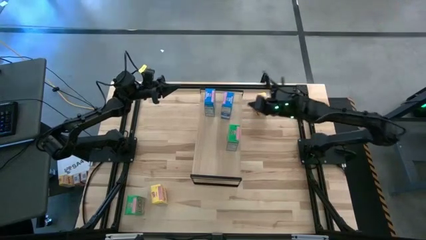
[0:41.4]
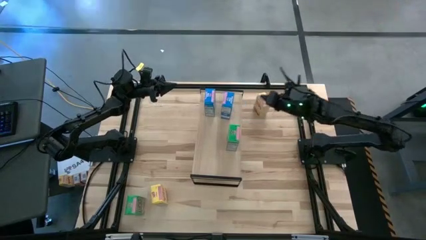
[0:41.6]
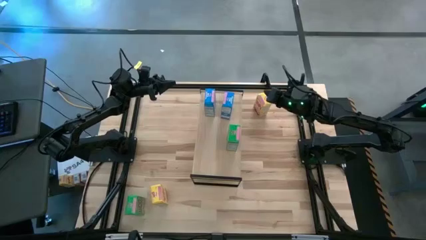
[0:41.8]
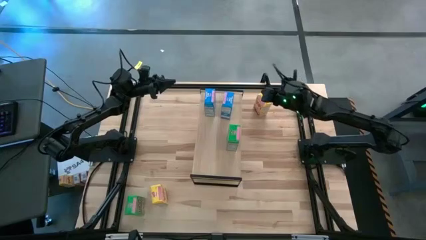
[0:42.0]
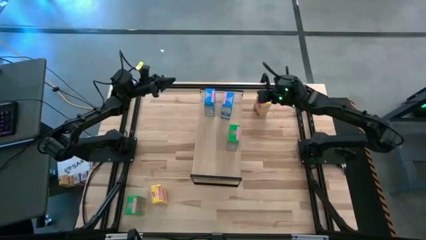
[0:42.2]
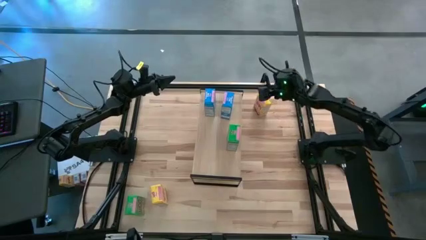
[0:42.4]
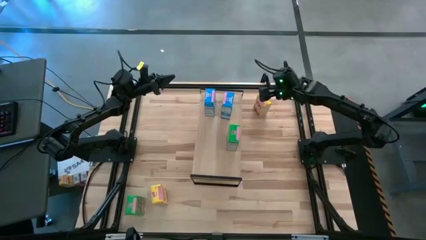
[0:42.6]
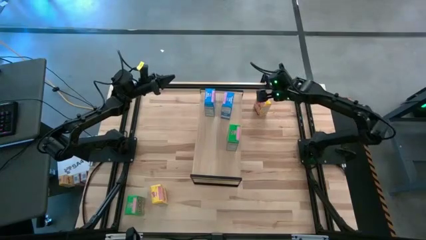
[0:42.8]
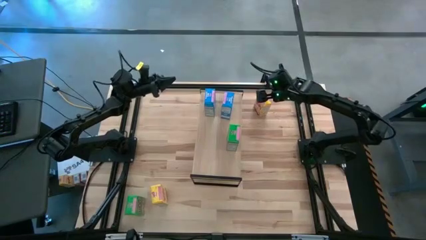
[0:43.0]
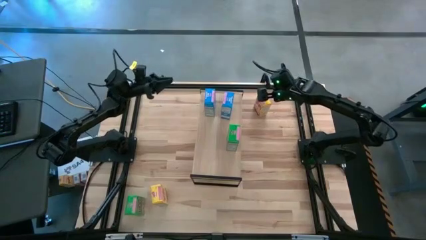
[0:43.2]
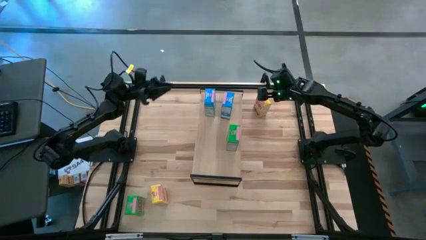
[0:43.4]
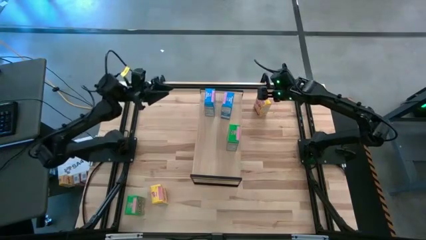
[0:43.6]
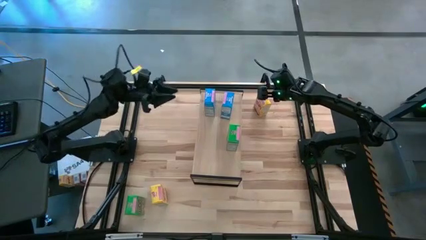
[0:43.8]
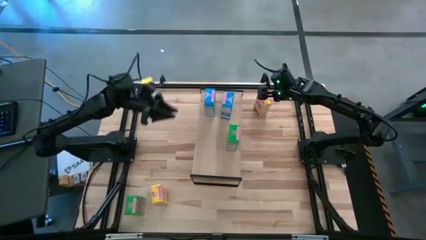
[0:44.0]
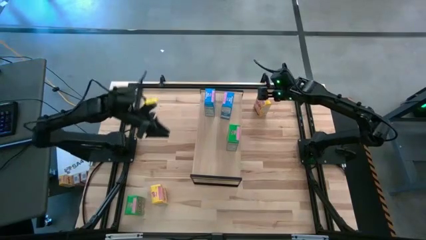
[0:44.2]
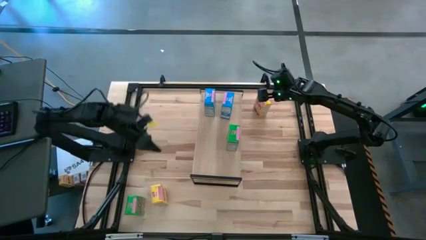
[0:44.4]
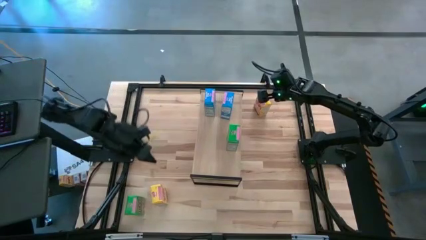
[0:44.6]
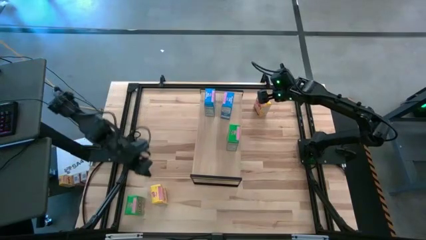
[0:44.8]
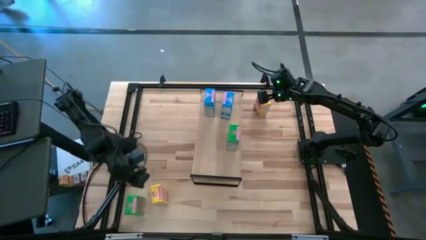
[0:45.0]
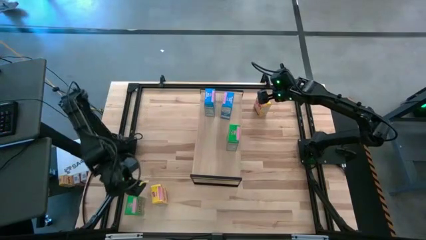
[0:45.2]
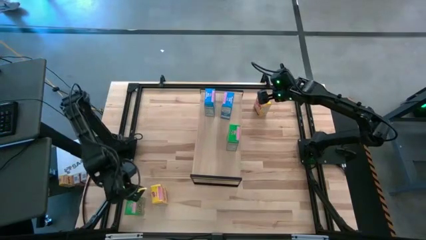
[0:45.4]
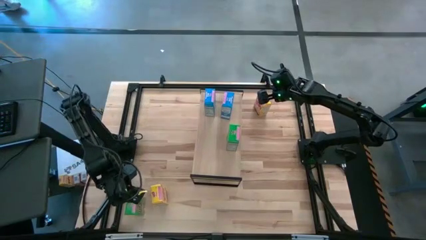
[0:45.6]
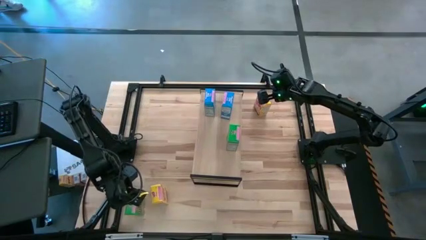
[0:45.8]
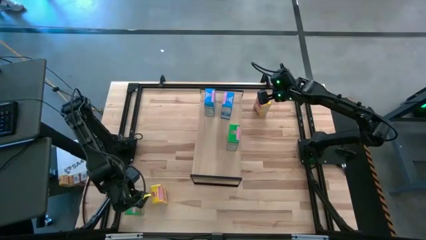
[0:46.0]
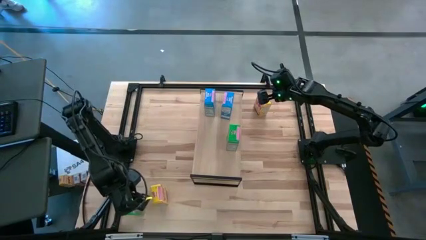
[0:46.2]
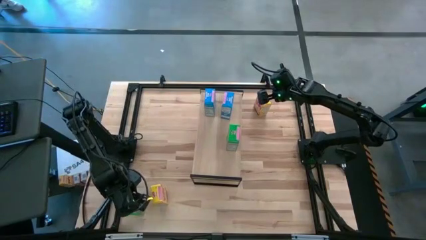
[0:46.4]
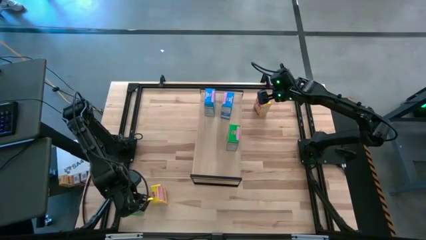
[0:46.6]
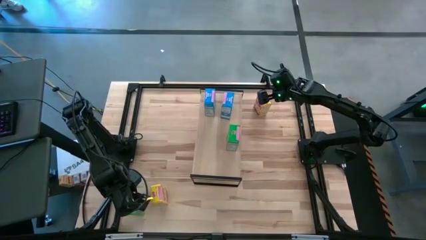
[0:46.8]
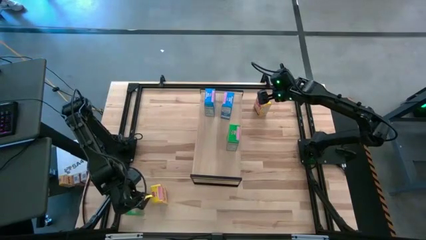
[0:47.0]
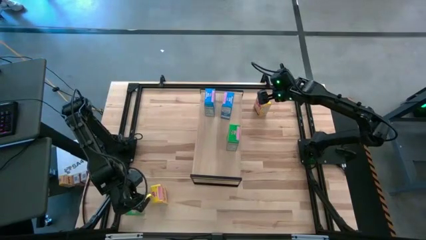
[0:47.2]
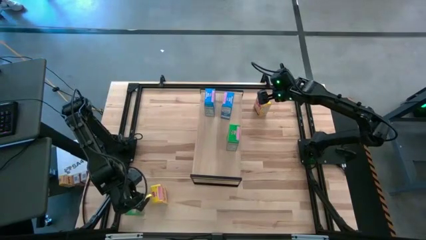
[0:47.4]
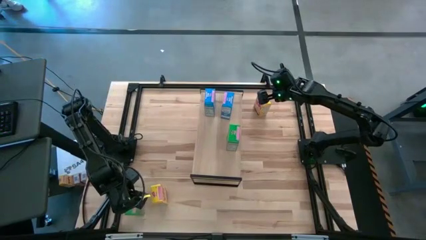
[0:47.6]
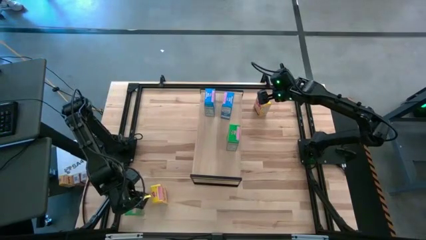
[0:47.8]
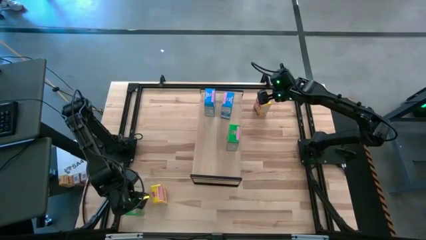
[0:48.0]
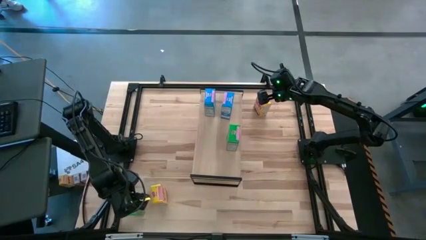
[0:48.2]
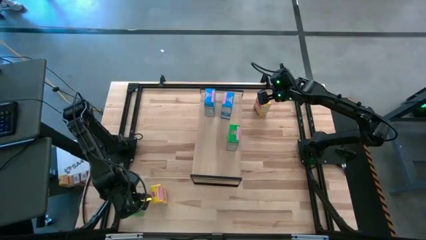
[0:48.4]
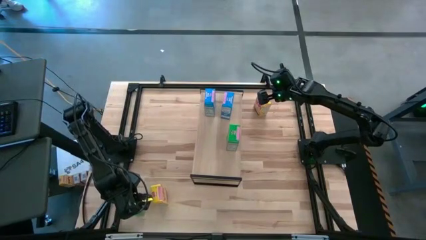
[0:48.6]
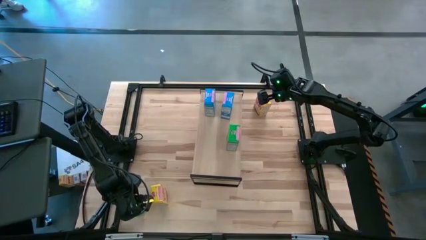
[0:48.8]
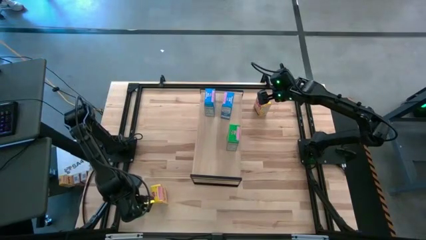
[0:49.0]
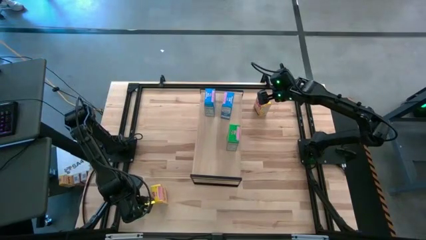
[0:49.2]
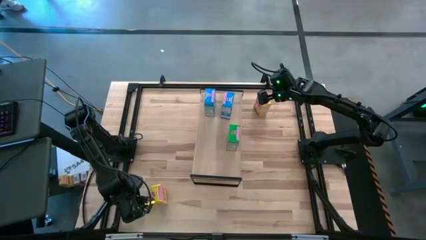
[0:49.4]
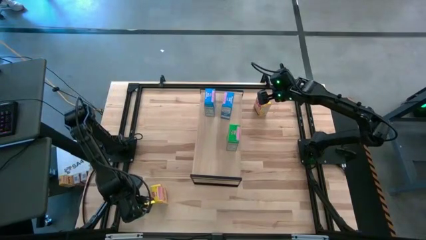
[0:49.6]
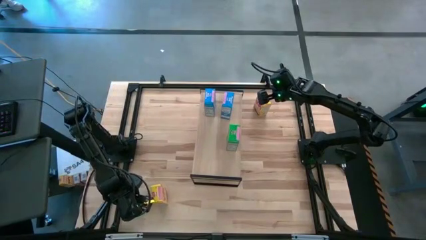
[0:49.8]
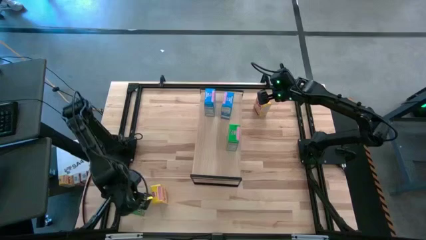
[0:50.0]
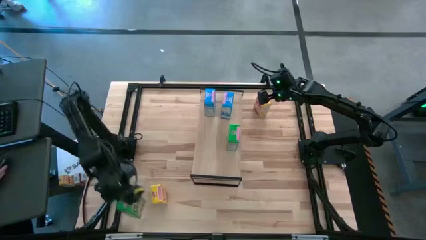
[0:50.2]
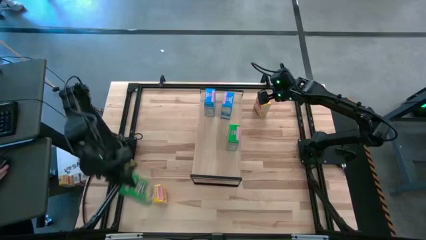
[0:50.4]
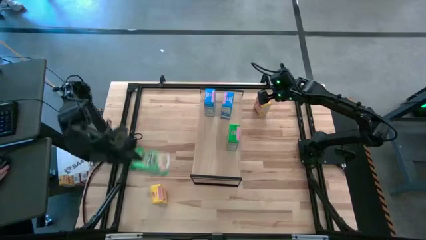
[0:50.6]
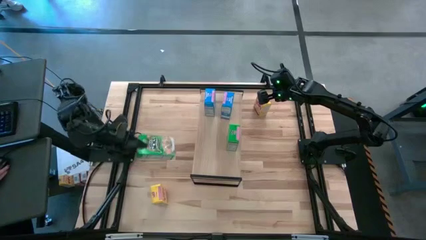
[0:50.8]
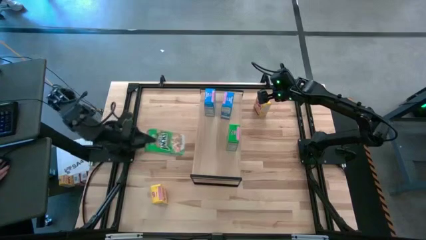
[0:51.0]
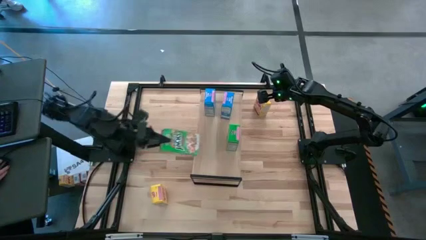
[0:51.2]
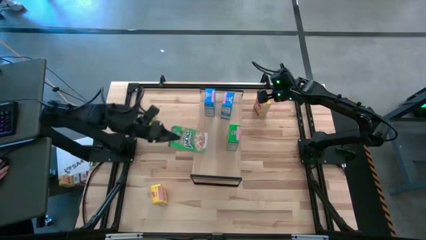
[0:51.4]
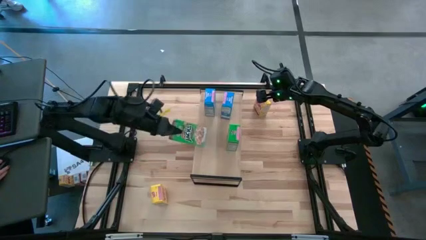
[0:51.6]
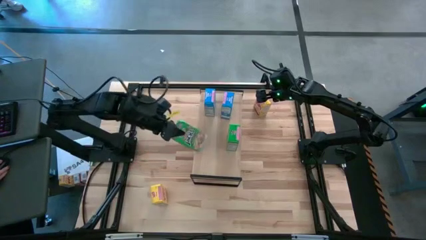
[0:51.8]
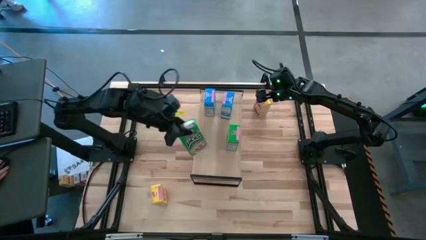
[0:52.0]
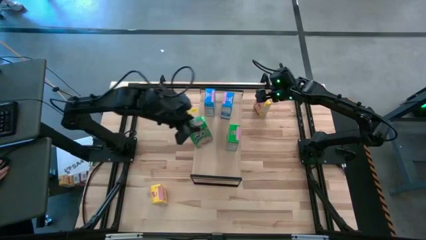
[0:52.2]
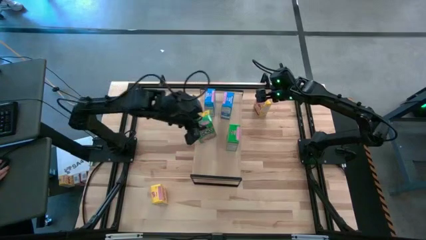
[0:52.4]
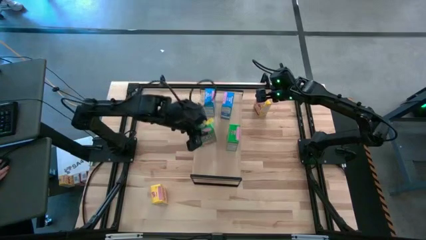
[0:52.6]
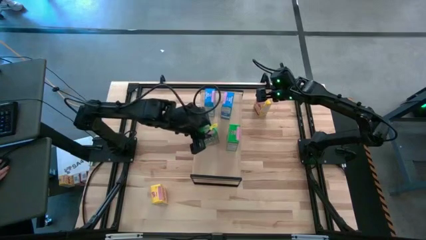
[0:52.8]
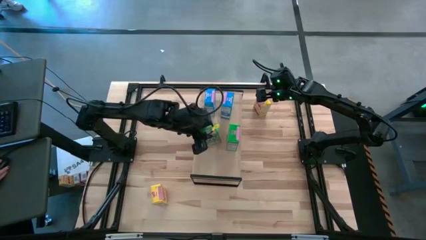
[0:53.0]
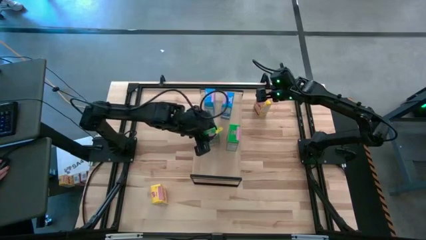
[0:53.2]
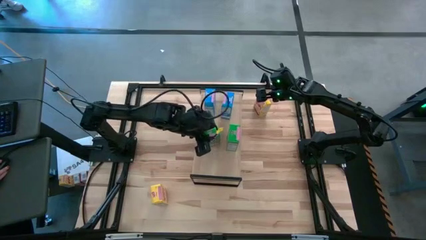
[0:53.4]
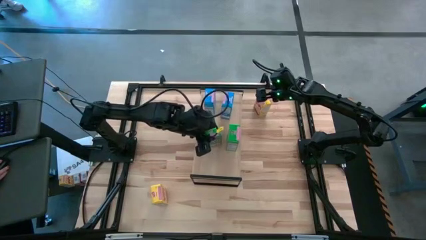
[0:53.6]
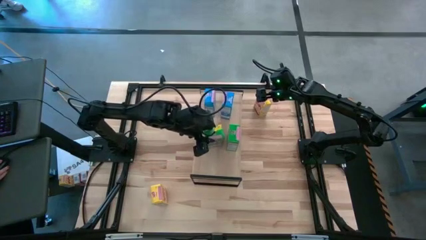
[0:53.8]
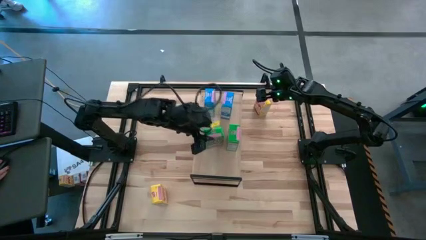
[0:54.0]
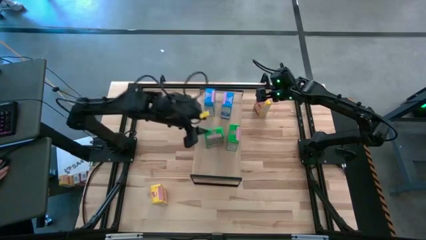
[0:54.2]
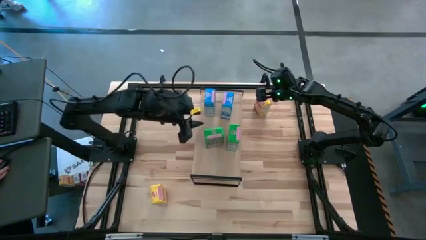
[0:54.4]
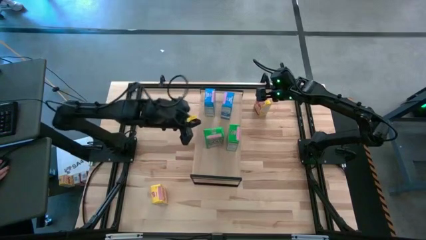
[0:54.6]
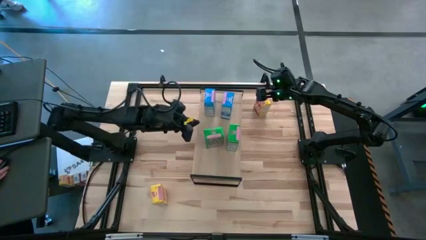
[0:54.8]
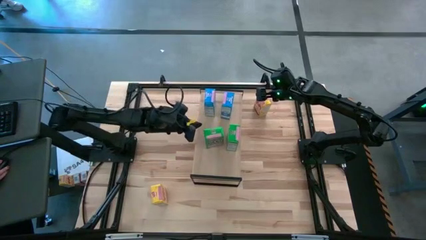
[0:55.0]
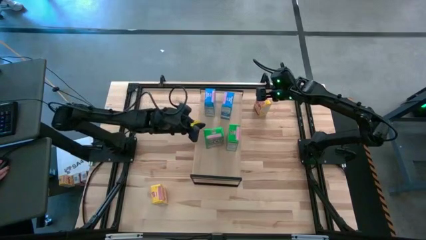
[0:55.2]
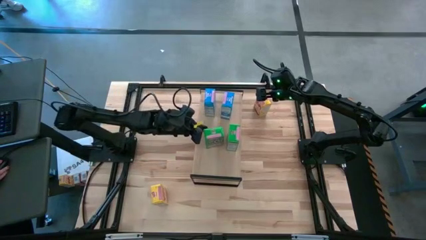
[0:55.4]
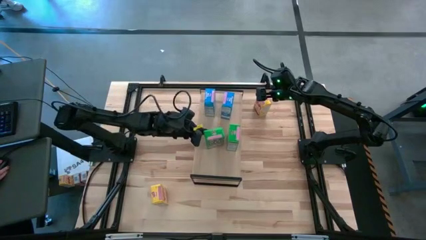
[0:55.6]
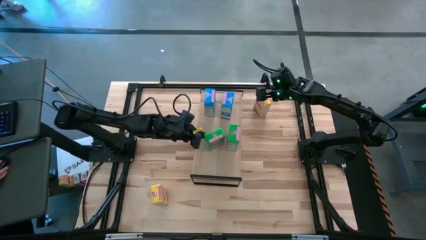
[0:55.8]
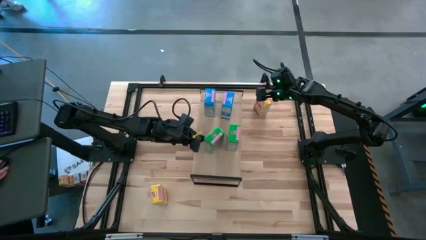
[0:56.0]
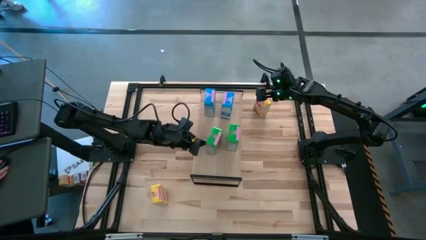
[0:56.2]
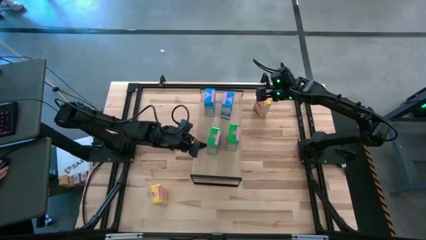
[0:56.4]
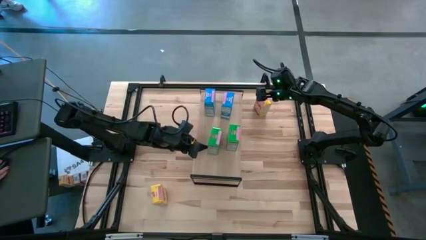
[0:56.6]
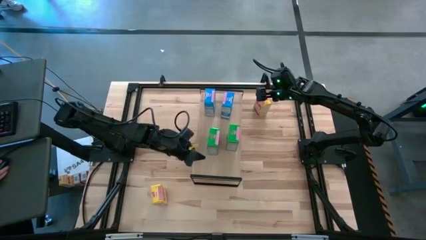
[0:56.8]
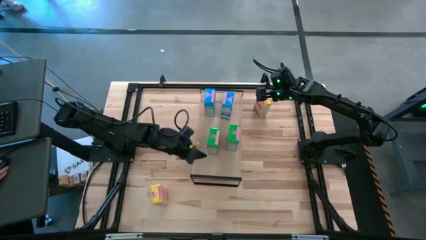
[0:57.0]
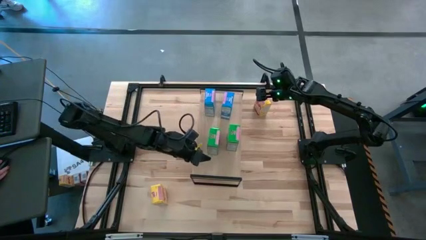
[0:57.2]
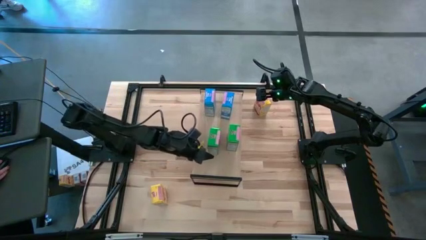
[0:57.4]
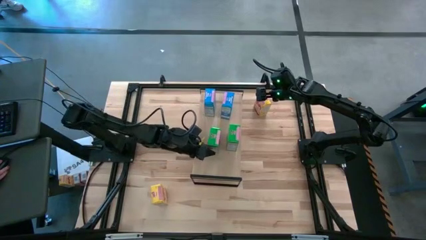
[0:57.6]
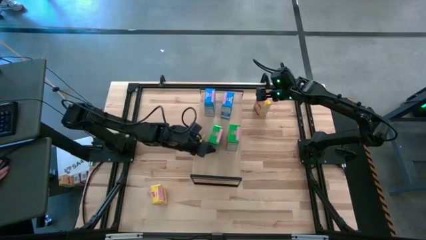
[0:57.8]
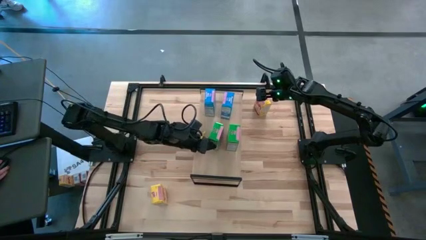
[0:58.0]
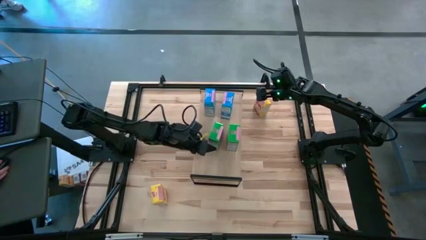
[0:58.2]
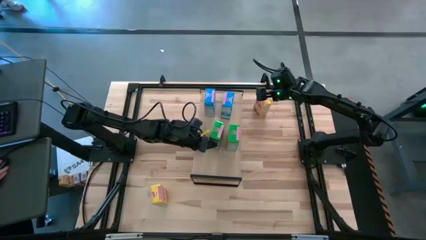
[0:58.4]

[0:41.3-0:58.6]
Task: Stack cereal on shelf
Put the green cereal box on the shelf aligned with the other green cereal box
